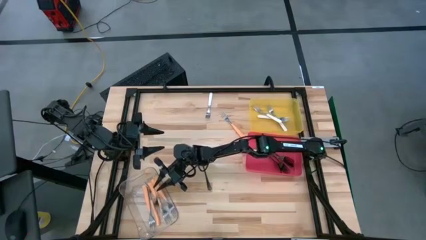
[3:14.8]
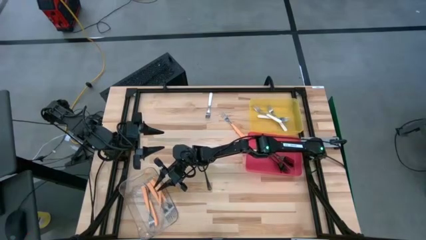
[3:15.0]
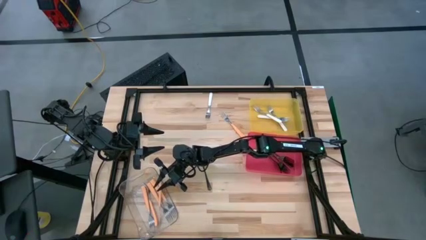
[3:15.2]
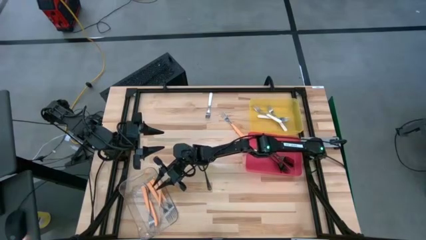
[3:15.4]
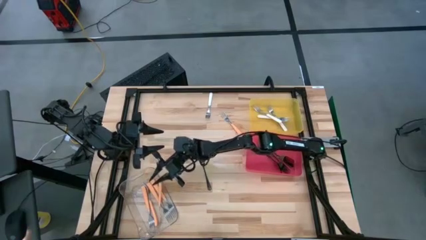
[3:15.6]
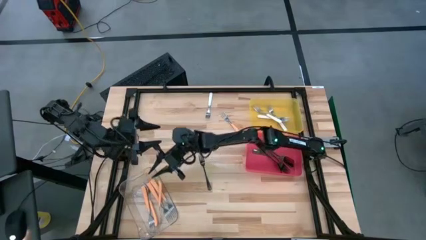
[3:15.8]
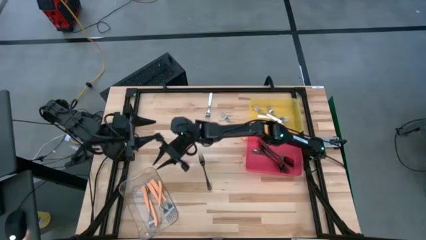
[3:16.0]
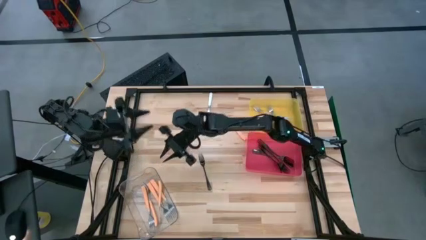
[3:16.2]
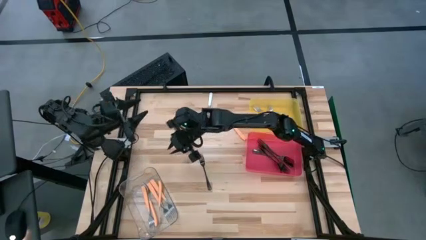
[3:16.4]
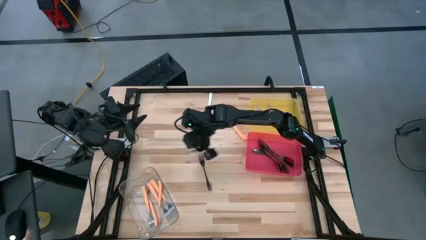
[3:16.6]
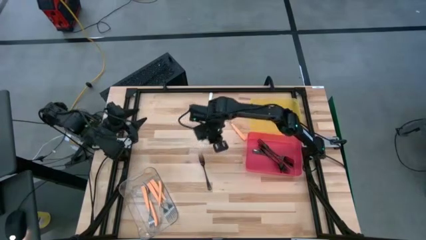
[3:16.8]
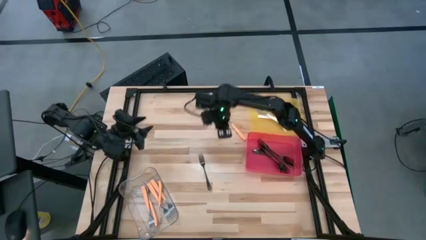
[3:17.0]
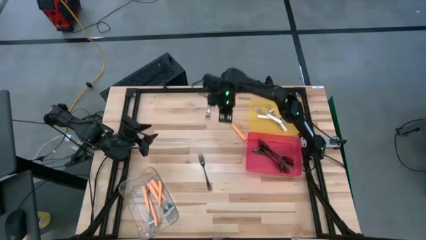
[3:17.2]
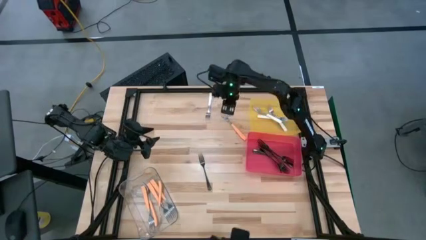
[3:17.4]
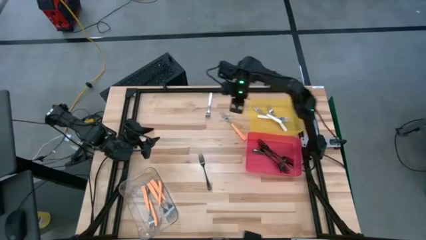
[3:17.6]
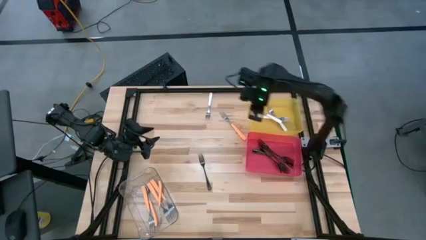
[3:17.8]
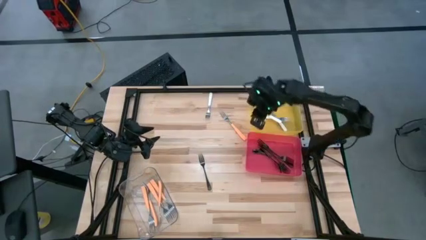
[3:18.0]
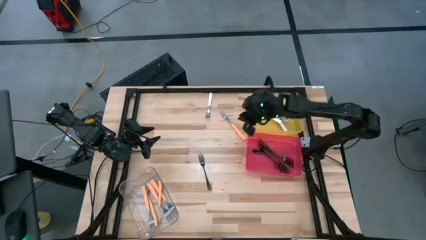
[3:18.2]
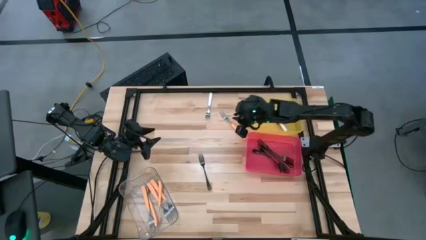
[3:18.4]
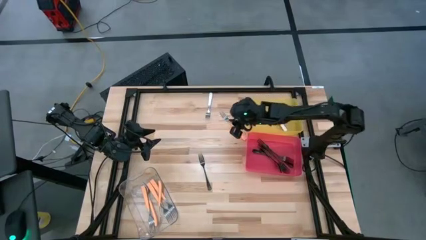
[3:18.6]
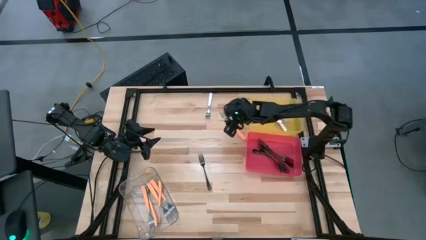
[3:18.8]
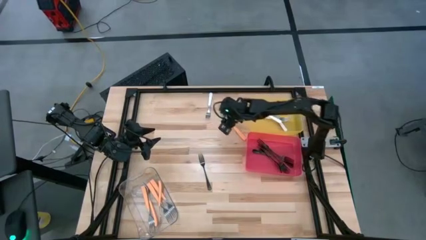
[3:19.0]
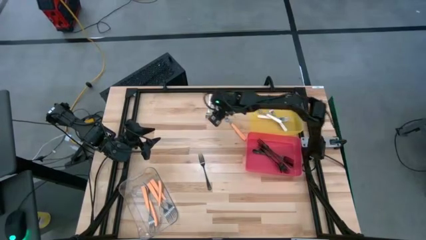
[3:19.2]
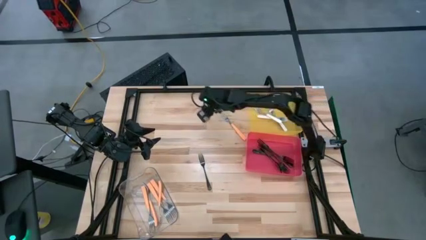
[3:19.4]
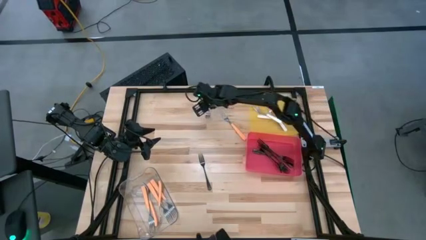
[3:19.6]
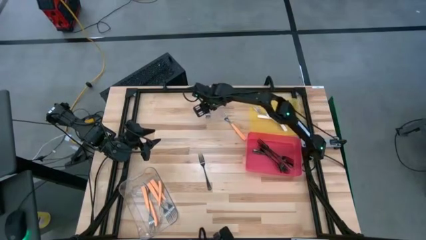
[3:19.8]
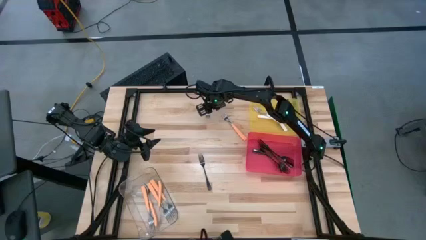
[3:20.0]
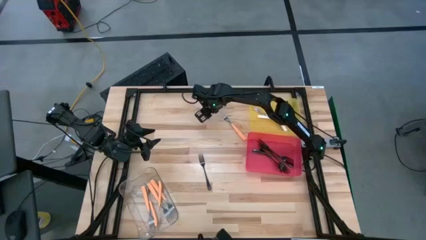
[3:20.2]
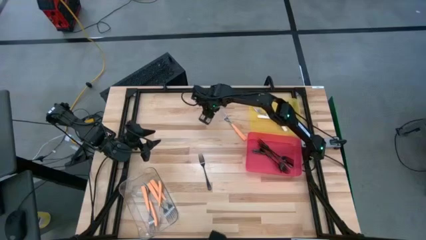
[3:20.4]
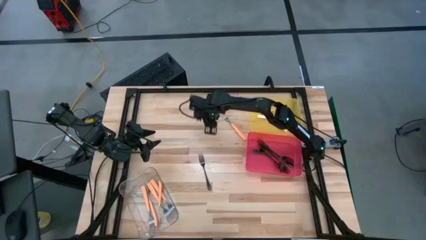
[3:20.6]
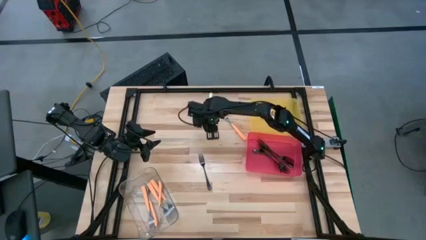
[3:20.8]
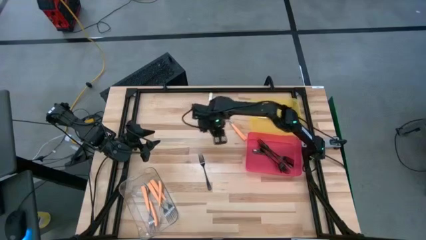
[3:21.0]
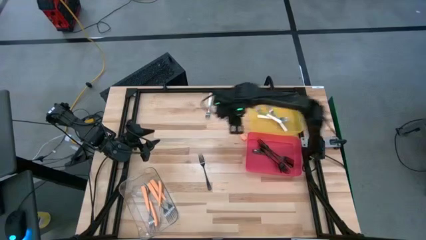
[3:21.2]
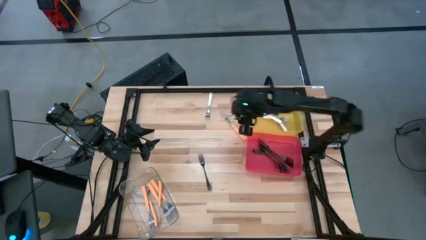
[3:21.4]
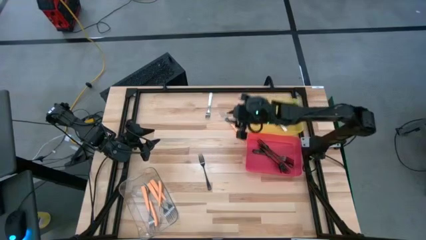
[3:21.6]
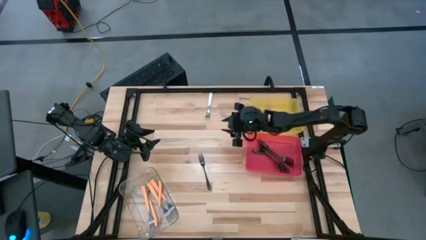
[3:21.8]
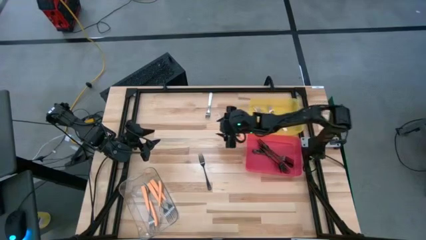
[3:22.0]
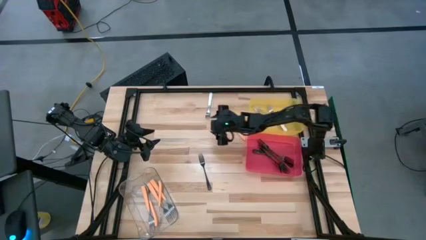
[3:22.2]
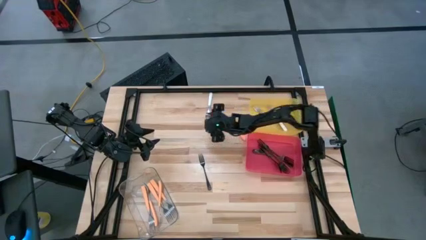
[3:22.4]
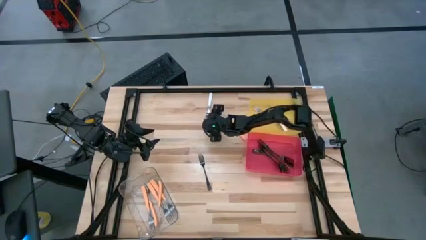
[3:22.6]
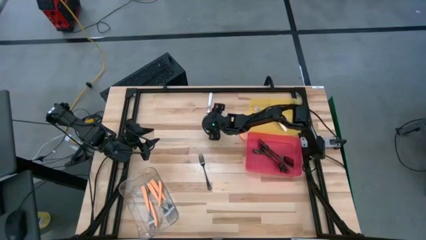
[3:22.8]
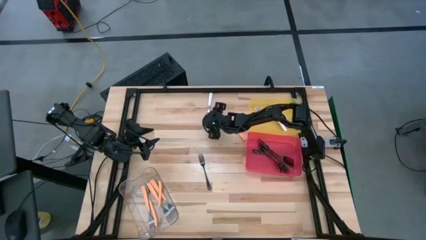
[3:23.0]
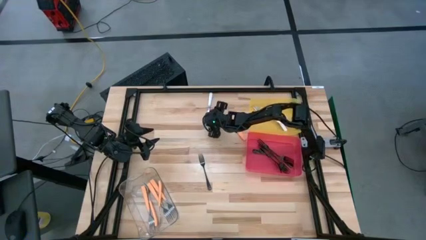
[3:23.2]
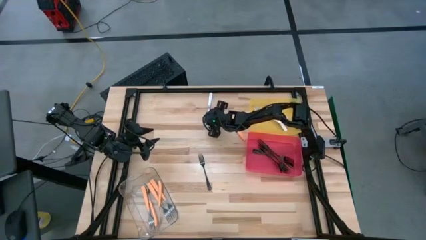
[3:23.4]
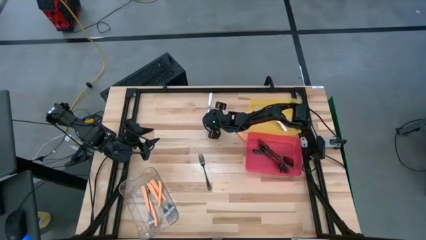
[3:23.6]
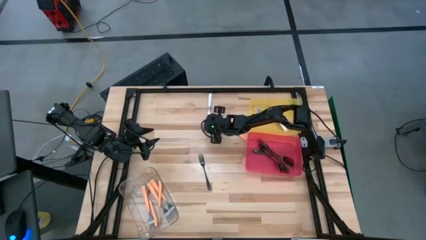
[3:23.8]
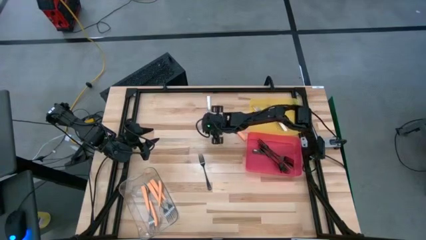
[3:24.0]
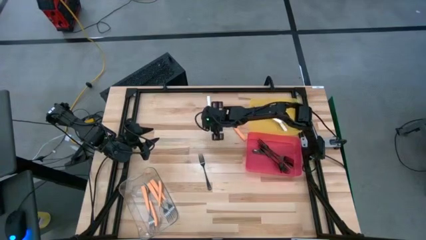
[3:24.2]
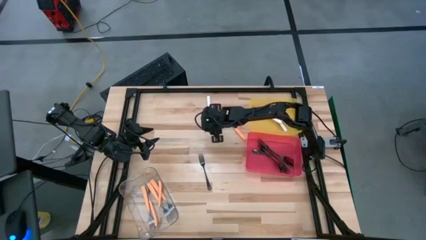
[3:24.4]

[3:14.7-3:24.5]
Task: Sort silverware by color (type)
Put the white fork into the yellow bin

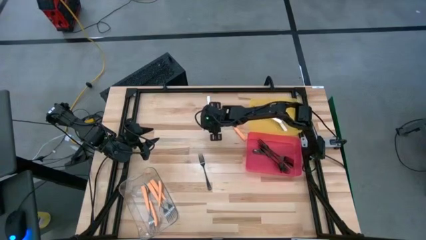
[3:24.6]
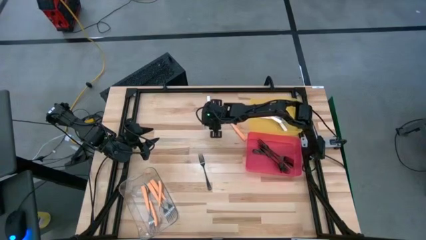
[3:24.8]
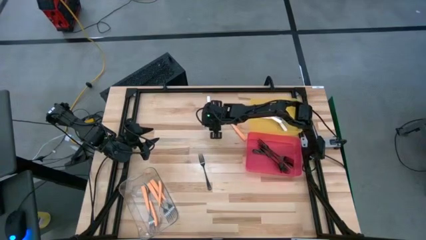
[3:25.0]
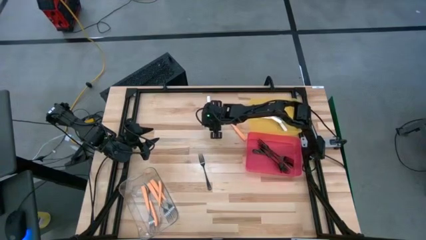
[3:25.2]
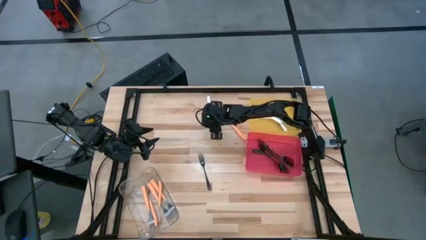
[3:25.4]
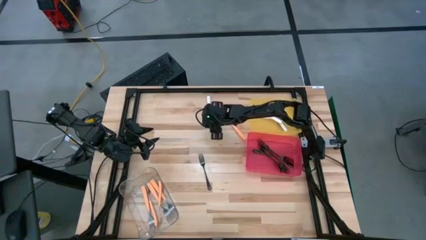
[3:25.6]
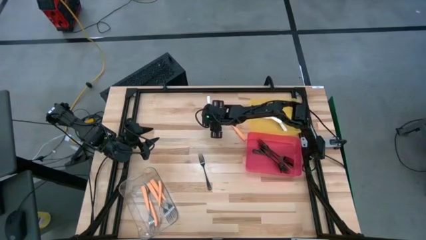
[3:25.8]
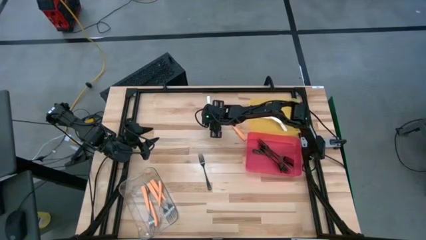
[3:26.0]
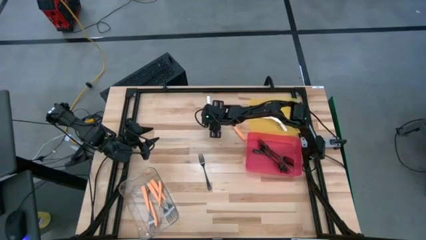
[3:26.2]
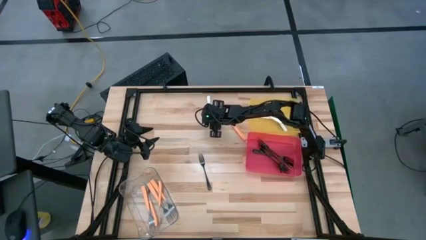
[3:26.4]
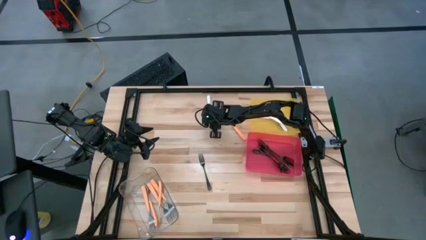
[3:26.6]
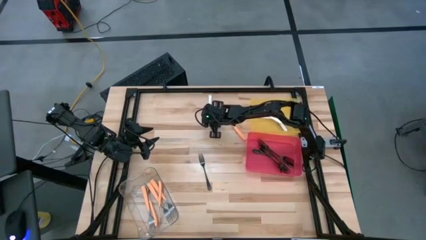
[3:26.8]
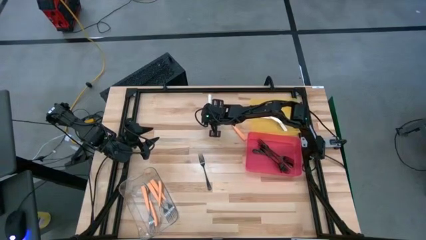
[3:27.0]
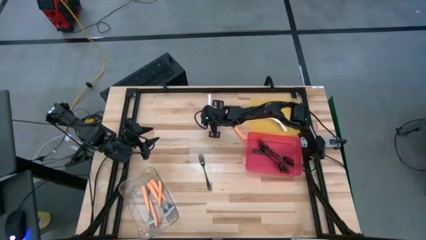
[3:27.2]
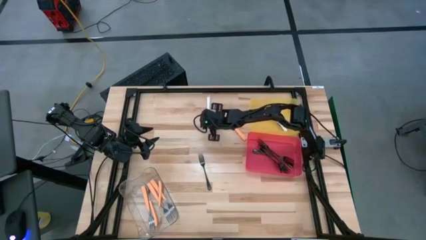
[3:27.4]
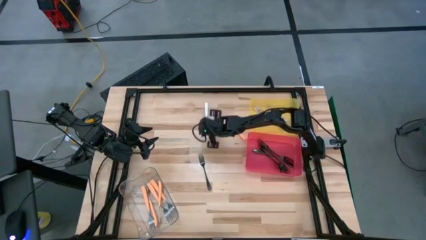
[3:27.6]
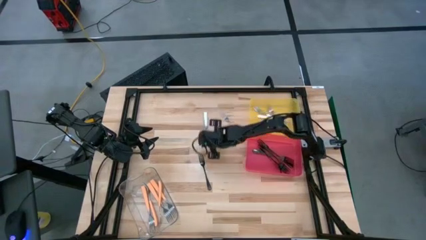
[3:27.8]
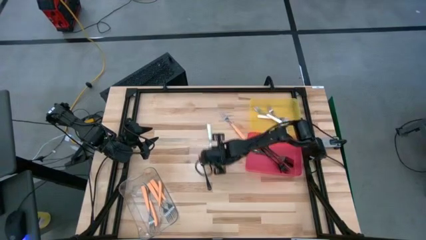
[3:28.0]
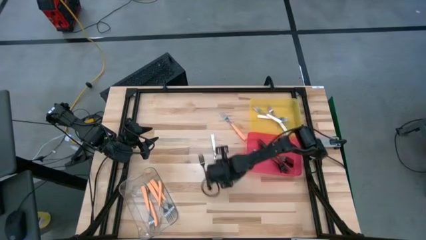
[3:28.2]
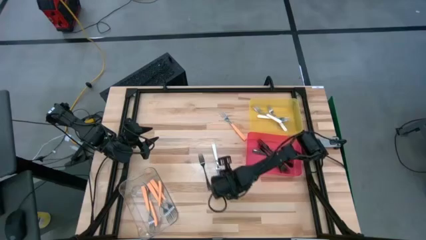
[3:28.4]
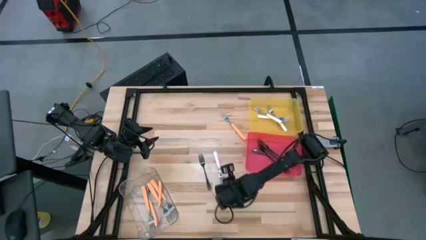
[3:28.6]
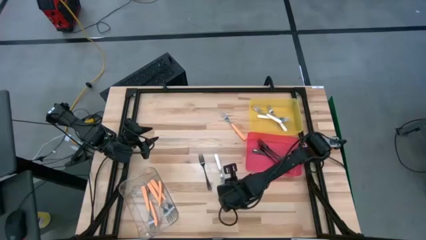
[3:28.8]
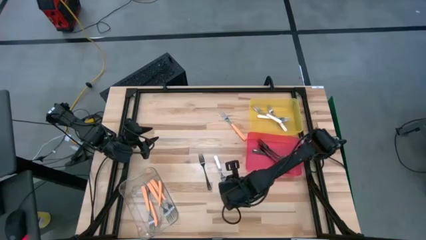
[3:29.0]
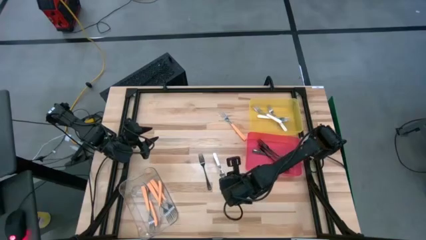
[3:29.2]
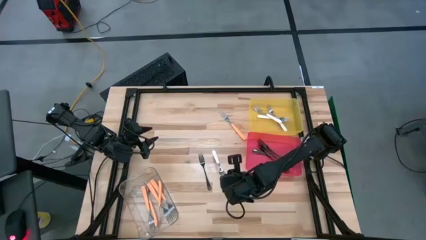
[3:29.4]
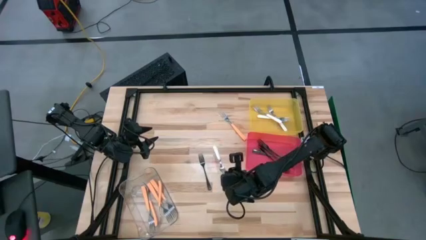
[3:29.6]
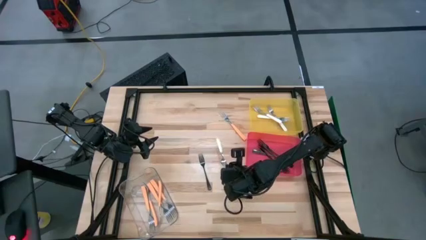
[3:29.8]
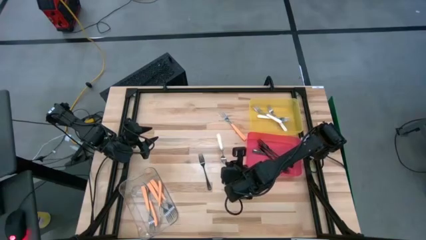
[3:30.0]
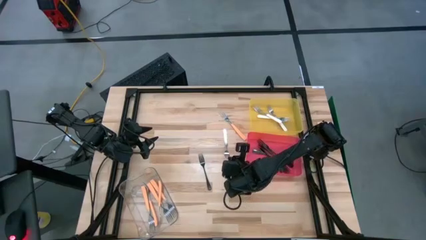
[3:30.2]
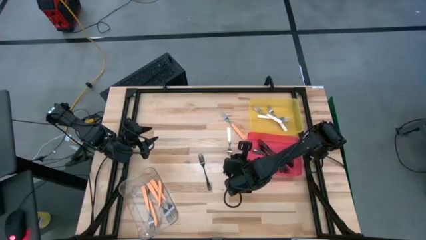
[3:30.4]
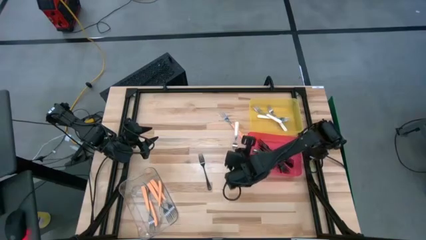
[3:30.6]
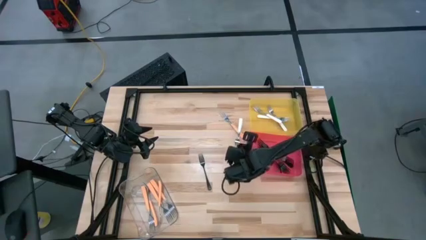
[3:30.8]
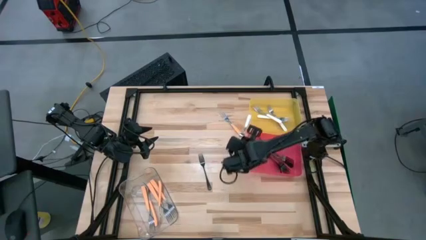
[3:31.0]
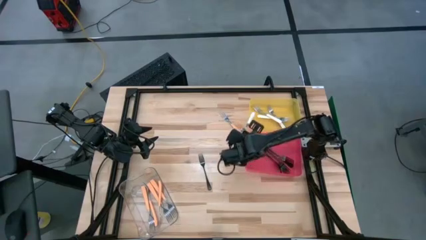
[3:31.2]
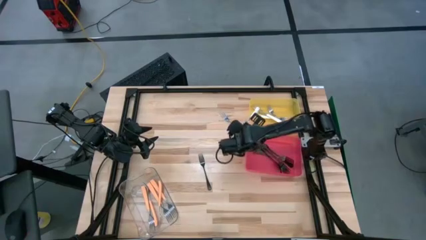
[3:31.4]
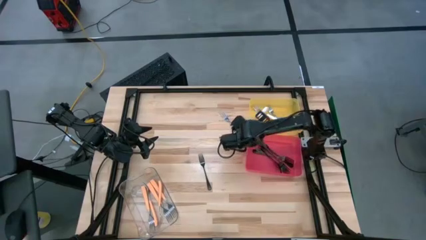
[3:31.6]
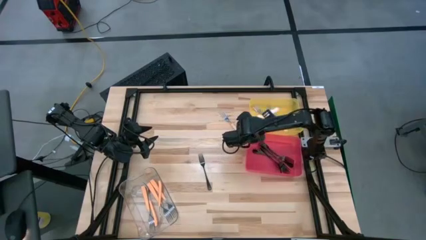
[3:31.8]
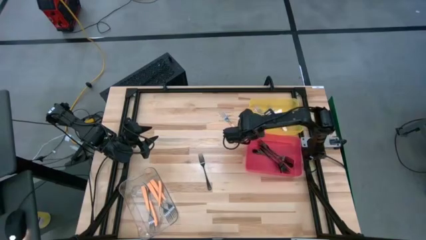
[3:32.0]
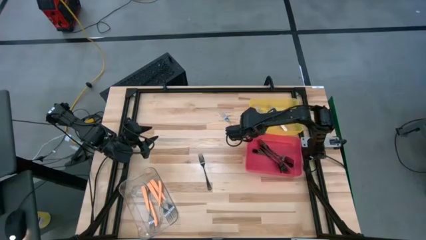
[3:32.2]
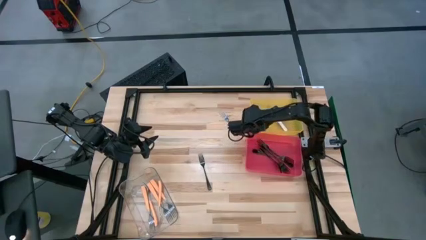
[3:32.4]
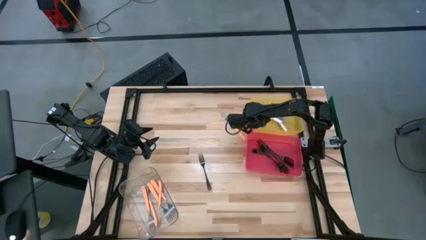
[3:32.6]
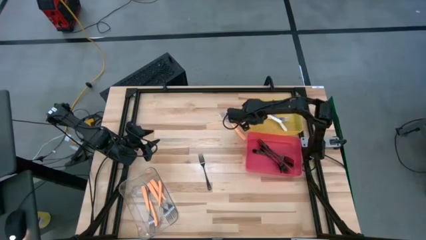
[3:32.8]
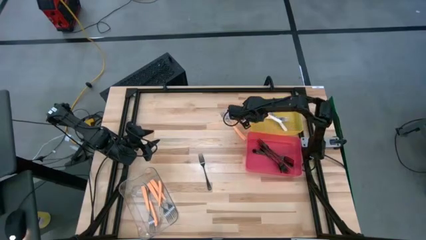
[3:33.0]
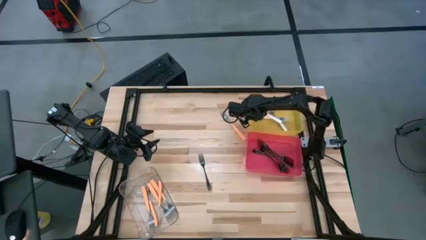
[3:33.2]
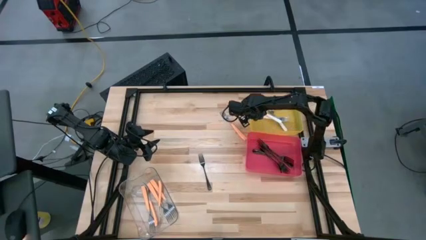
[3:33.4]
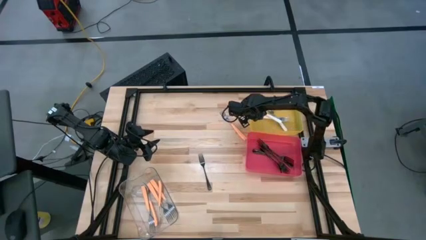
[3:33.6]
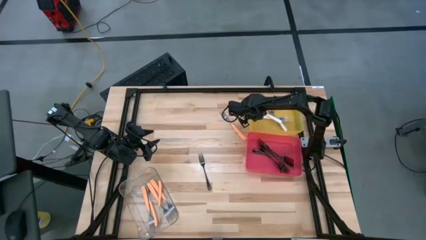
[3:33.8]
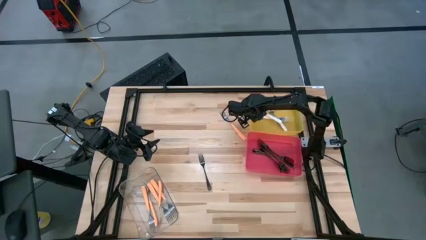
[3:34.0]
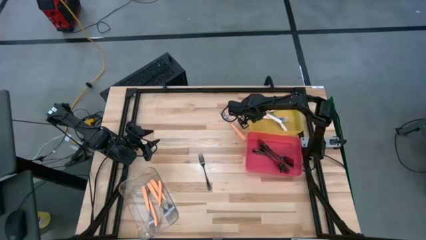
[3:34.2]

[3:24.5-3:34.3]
Put the white fork into the yellow bin
